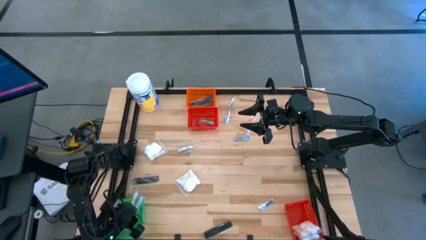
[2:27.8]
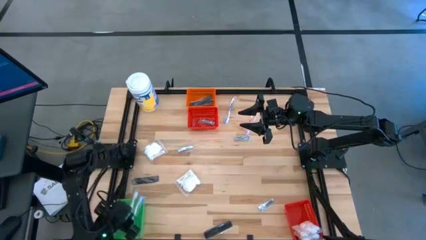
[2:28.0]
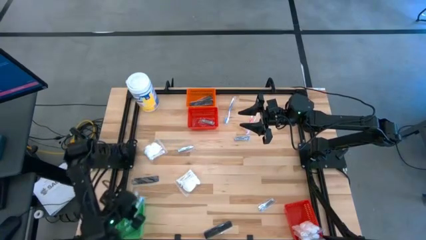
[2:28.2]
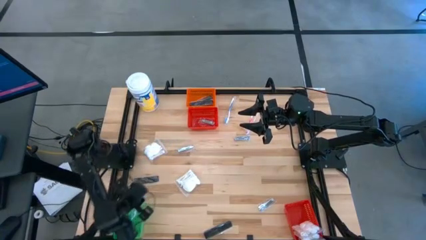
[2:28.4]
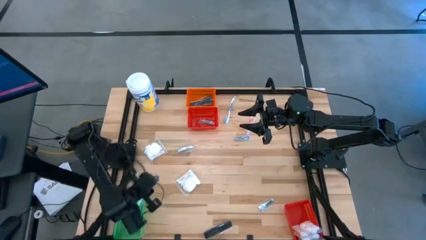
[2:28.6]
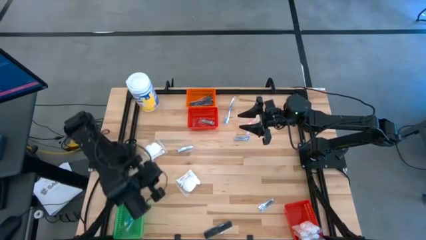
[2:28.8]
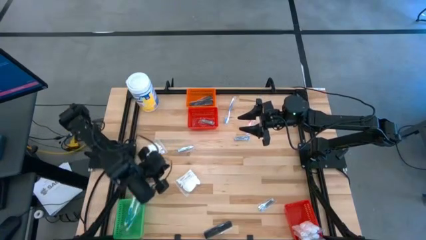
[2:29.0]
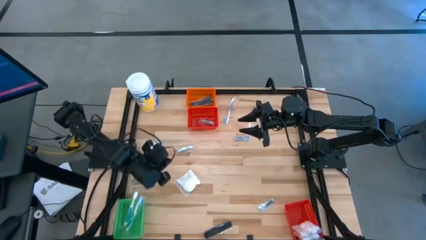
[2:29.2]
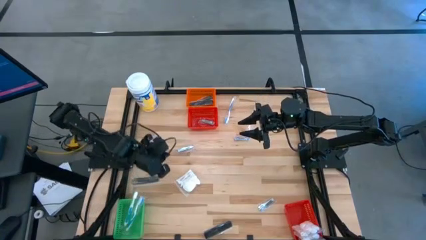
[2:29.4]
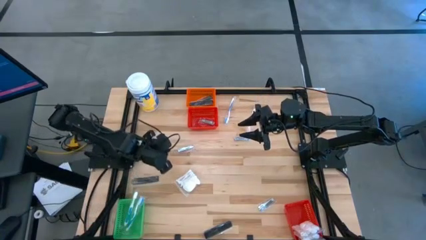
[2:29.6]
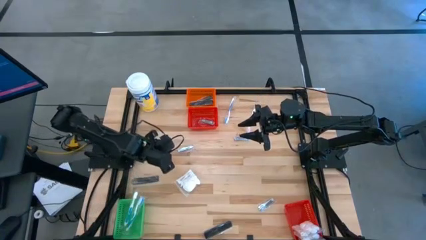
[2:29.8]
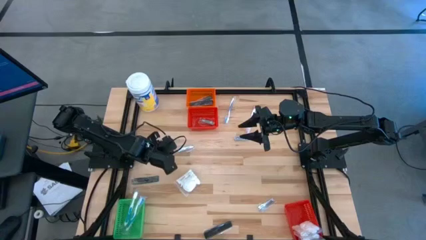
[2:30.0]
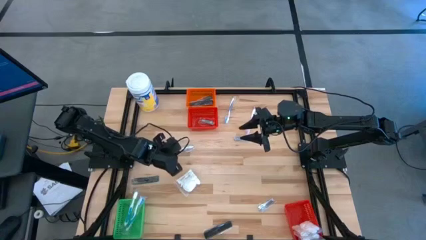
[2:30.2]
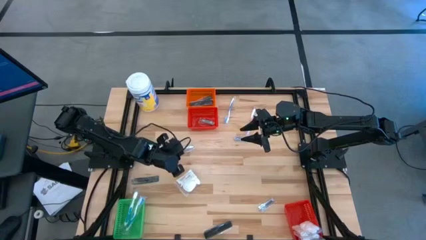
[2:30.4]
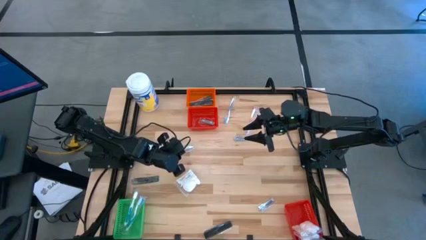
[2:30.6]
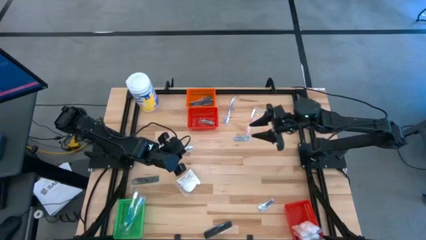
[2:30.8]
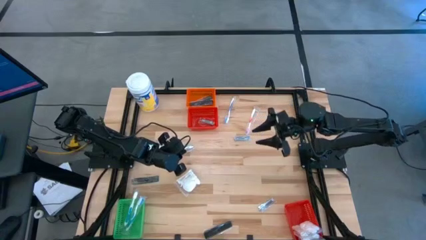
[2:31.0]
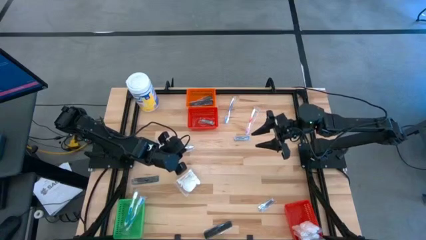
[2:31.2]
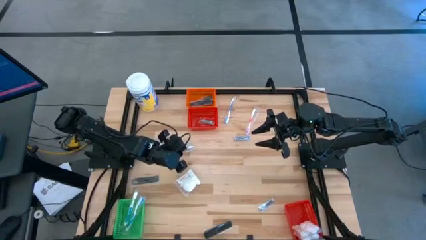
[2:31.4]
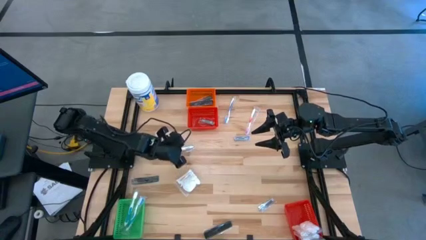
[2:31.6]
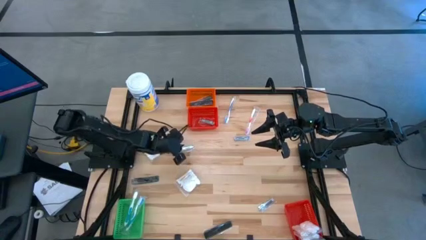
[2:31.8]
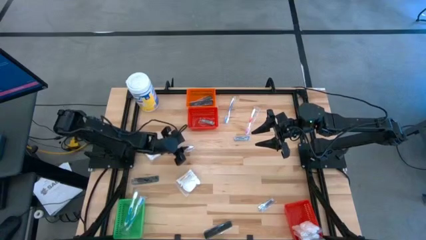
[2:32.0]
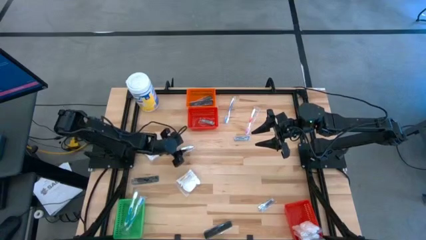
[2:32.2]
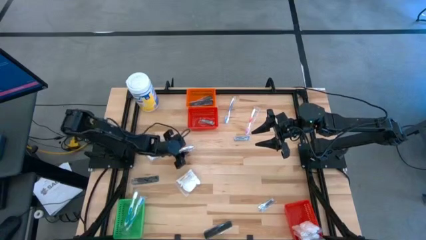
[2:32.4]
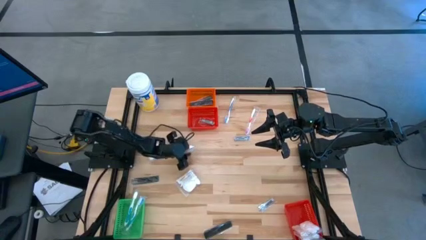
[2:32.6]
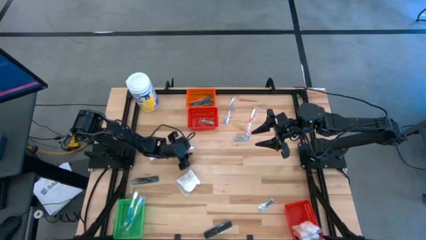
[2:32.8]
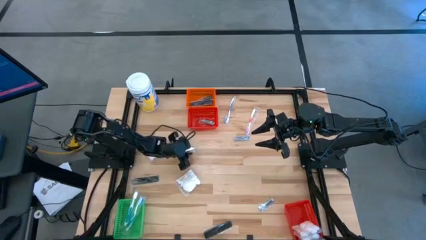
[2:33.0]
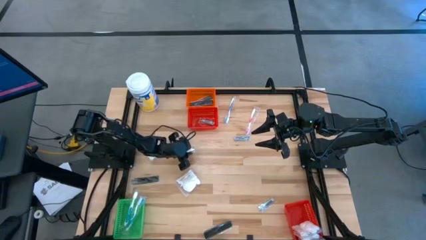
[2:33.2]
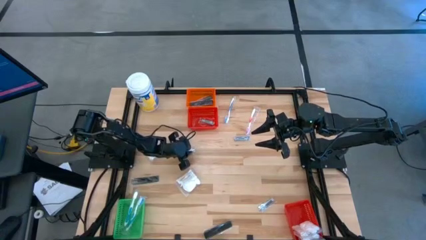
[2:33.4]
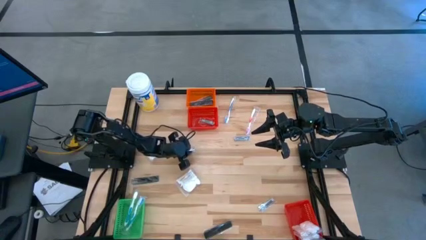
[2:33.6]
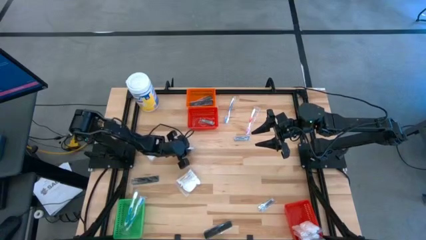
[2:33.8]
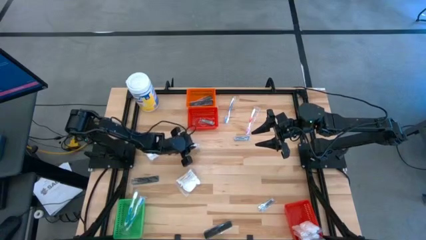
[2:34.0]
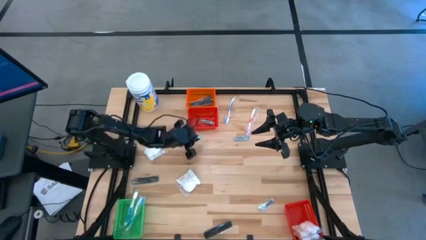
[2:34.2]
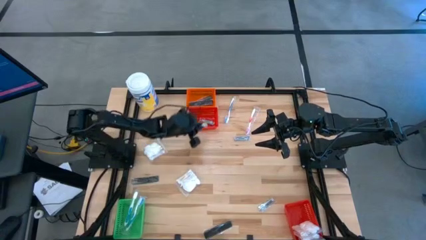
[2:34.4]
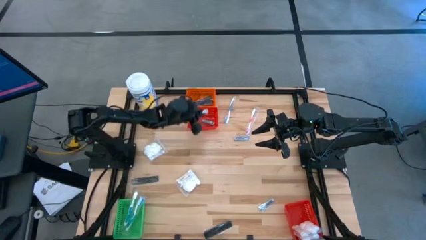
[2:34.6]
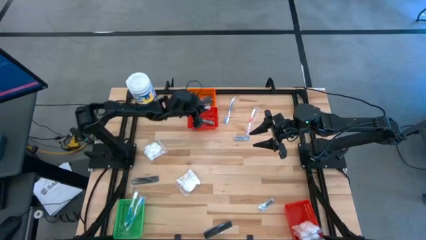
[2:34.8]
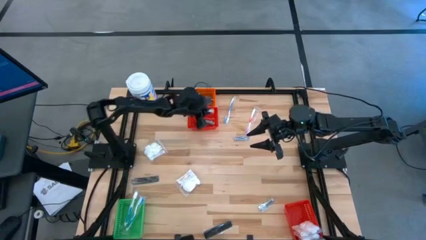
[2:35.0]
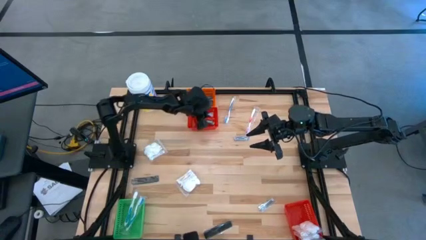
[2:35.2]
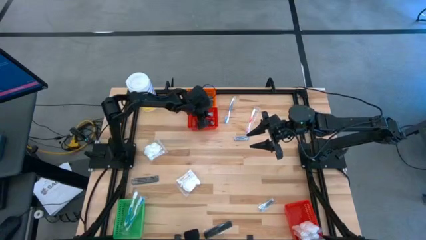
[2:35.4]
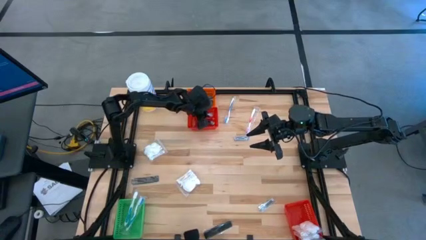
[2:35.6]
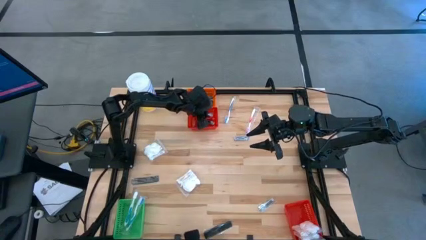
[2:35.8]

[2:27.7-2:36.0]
Task: Pick & Place Travel size toiletries
Put the nail cutter into the top red basket

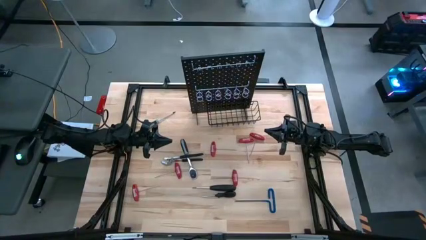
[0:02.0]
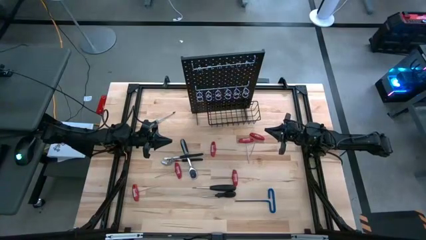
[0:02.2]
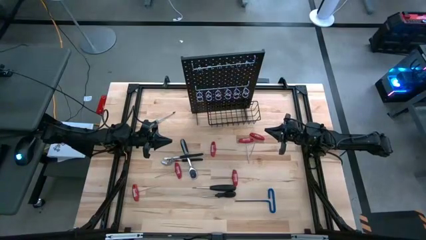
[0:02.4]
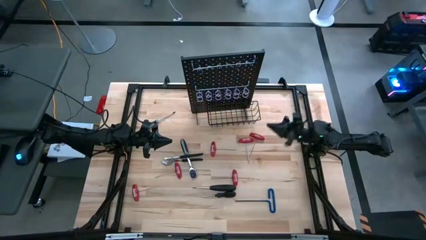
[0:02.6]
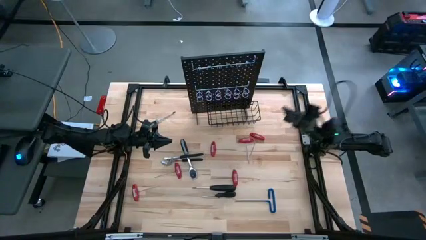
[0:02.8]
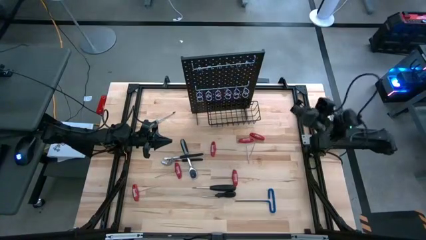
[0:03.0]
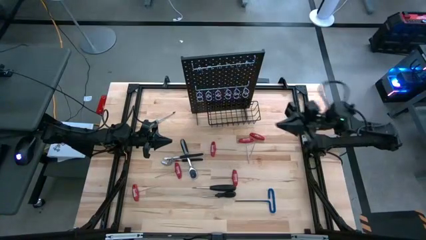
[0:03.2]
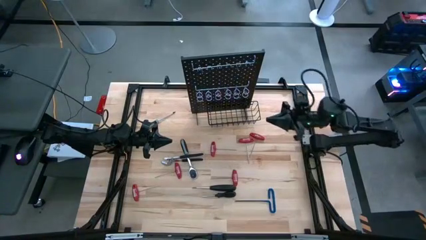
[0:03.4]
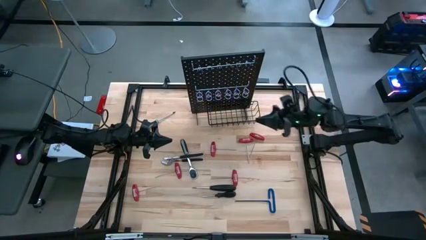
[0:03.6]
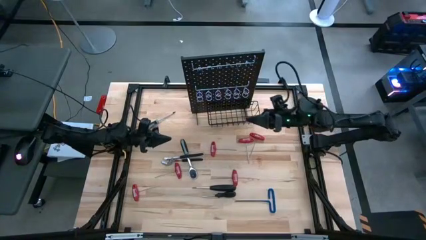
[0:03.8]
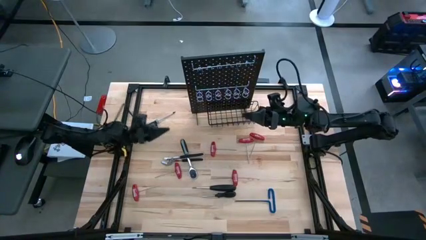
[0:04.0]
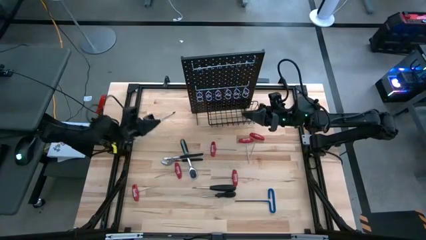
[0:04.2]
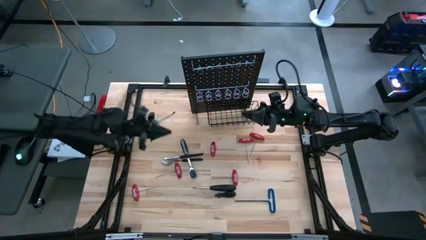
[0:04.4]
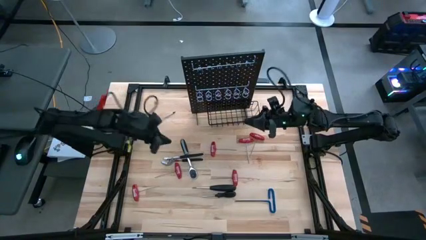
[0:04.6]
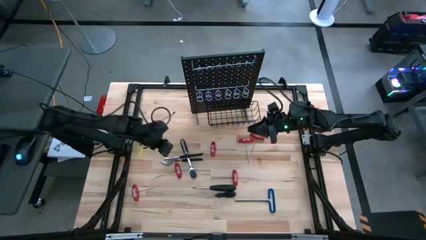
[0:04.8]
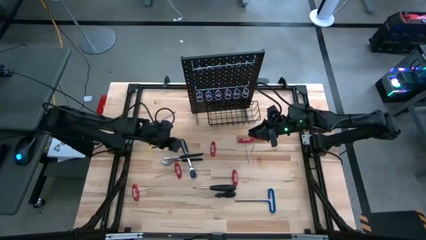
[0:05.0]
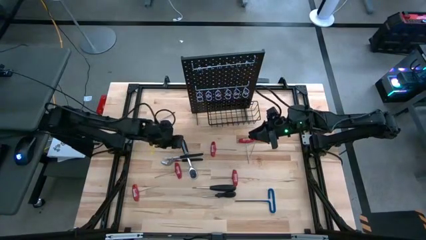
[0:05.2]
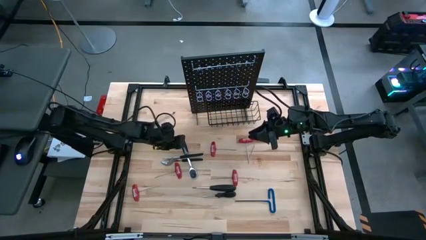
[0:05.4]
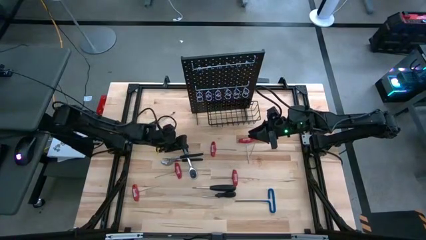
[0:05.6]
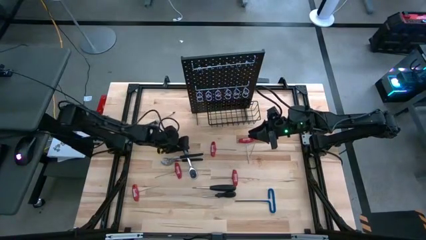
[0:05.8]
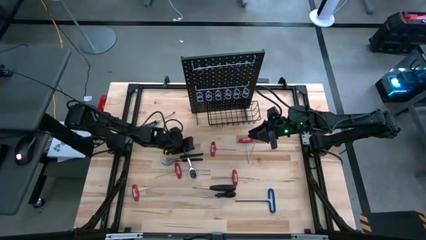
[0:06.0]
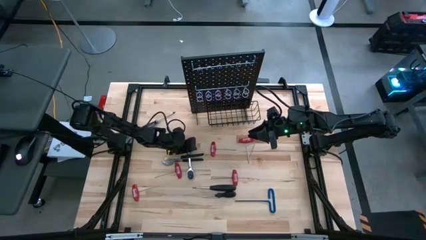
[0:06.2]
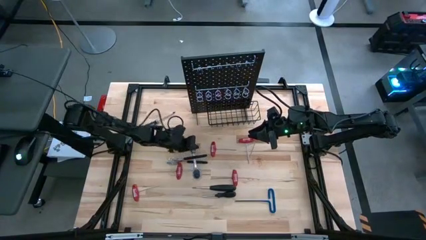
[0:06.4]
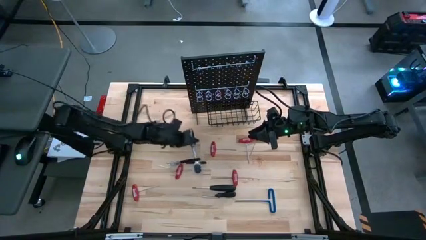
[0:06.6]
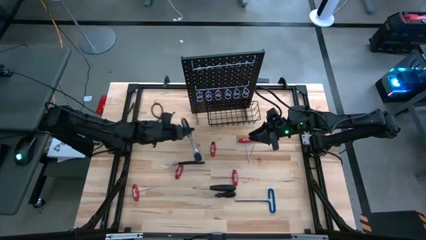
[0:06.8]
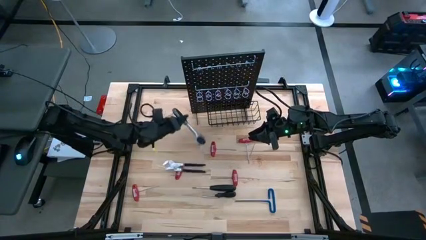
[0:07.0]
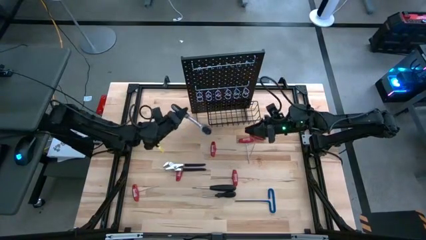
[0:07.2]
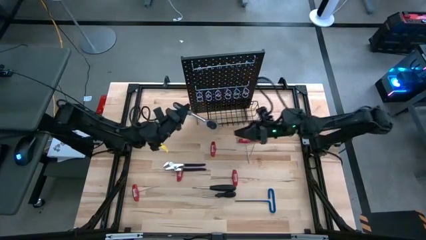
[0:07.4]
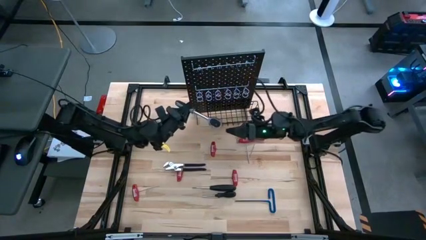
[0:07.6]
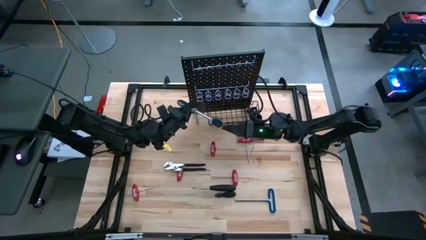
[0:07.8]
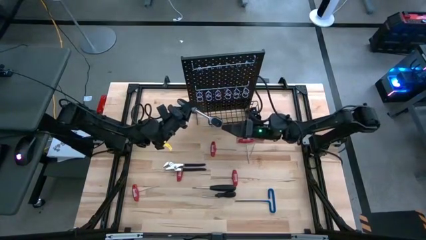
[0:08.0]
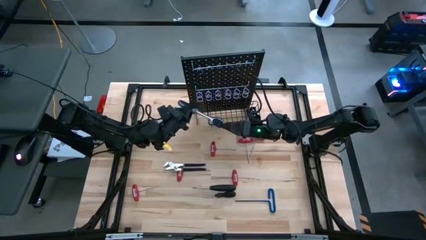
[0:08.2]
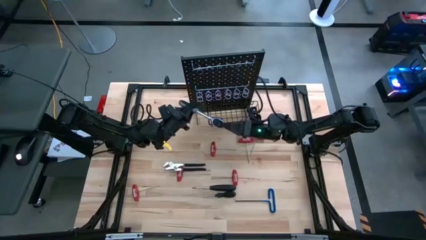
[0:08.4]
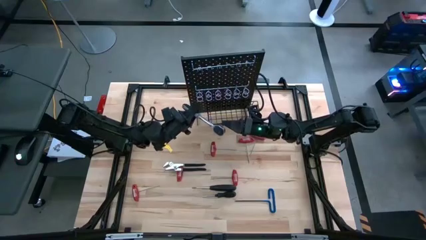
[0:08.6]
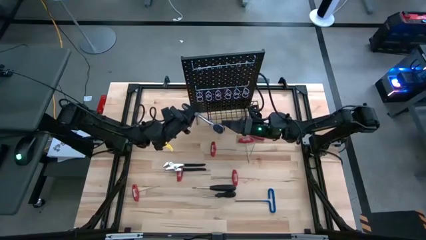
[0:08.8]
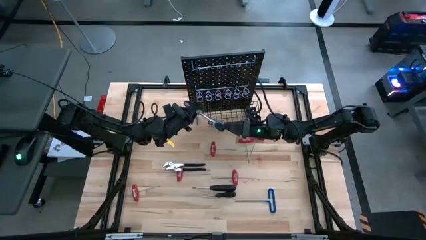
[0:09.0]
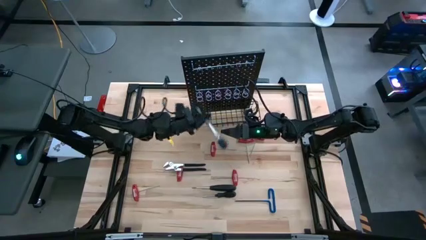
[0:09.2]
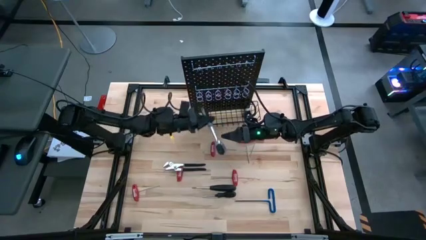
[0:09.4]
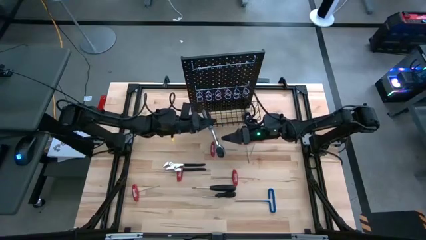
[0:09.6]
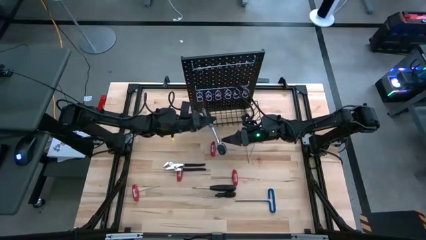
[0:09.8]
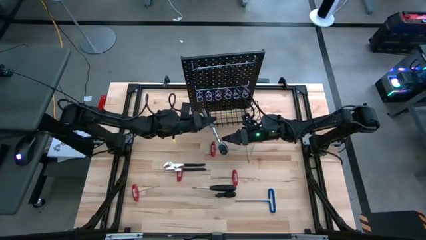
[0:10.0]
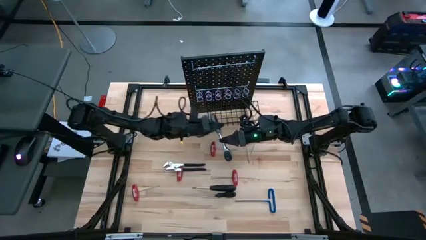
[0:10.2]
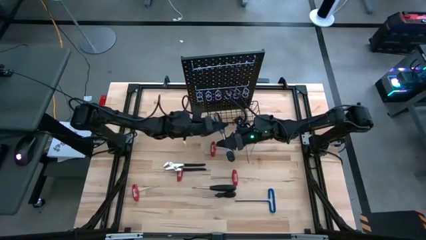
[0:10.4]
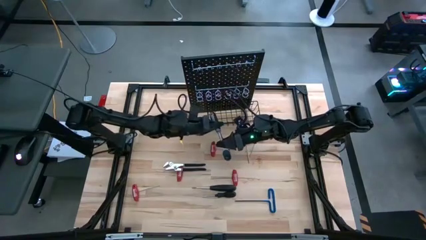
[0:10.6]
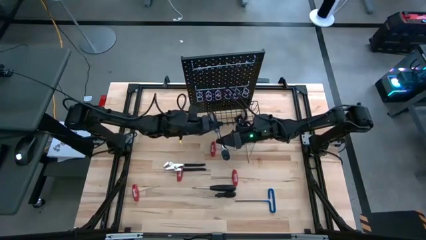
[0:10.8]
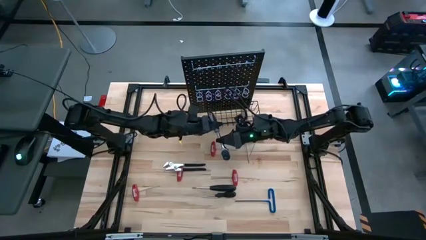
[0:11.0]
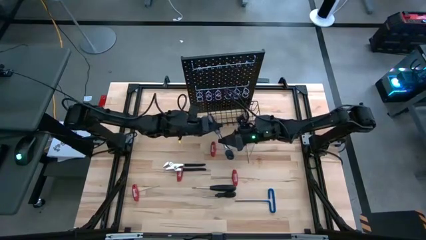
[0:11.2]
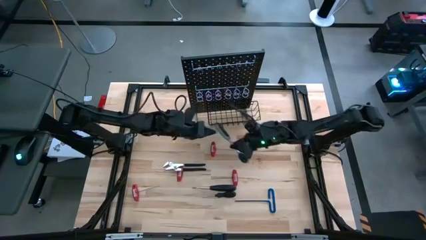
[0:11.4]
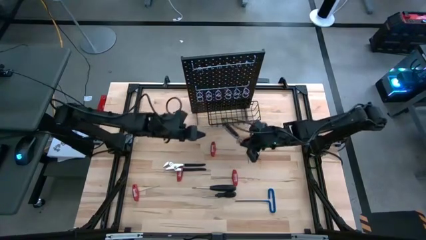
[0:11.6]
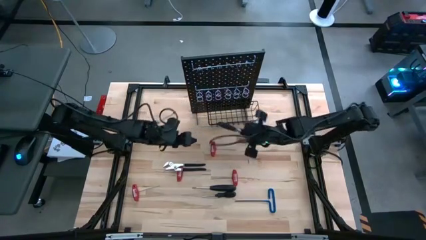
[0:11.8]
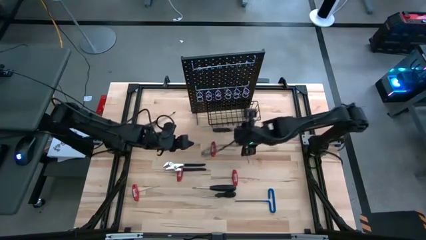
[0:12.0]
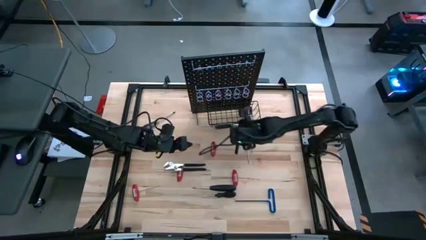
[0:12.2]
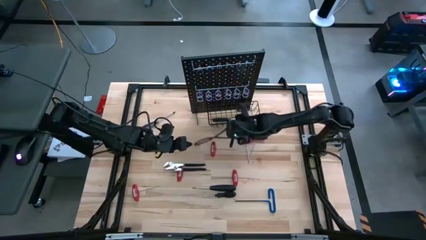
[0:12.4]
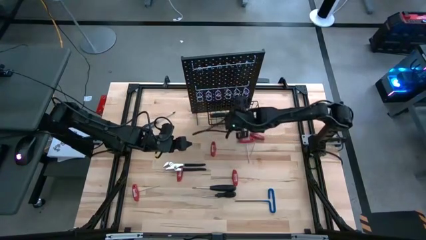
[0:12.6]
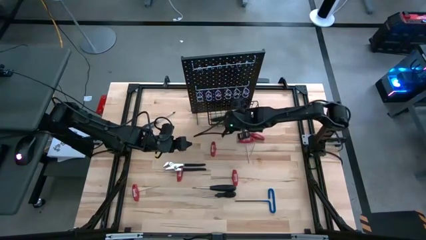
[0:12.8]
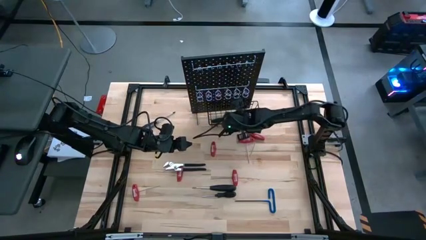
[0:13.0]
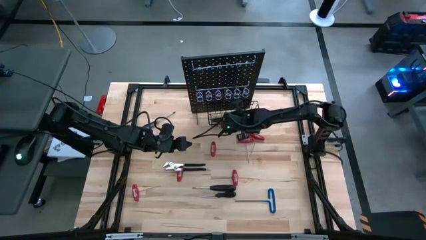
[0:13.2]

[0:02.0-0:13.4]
Task: Hang tools onto peg board
Put the black ratchet wrench into the wire basket on the pegboard
